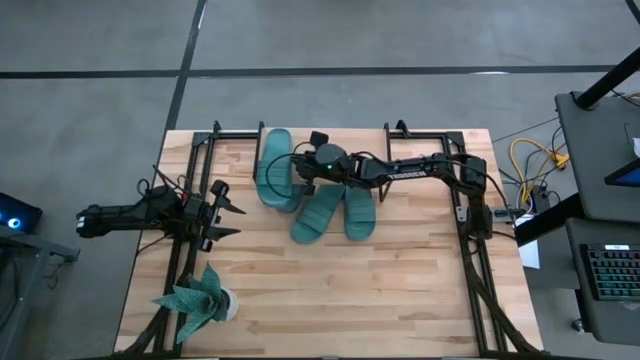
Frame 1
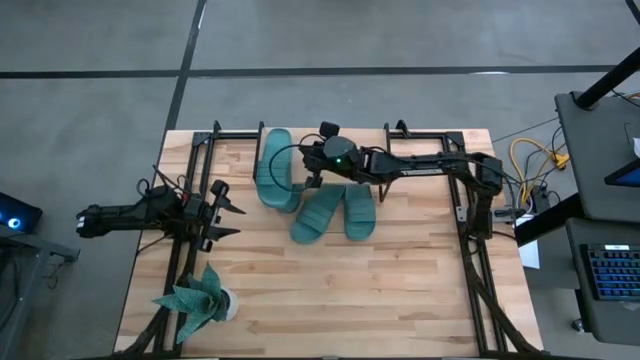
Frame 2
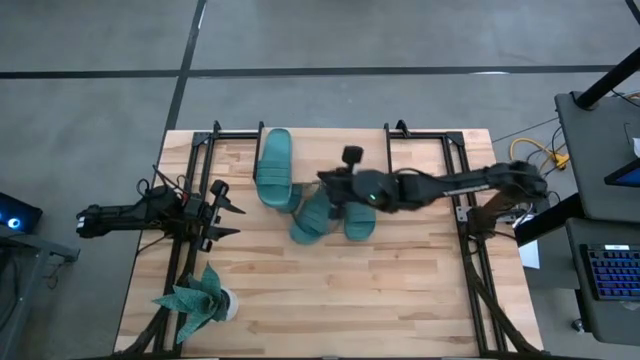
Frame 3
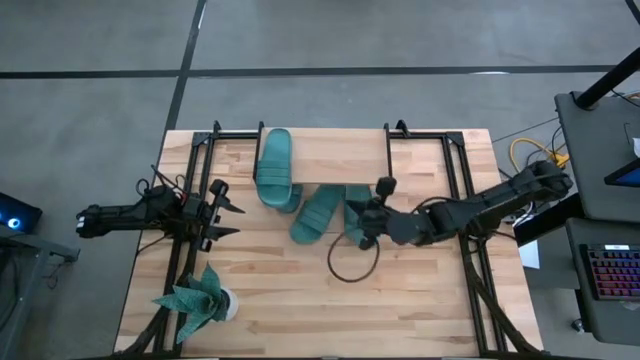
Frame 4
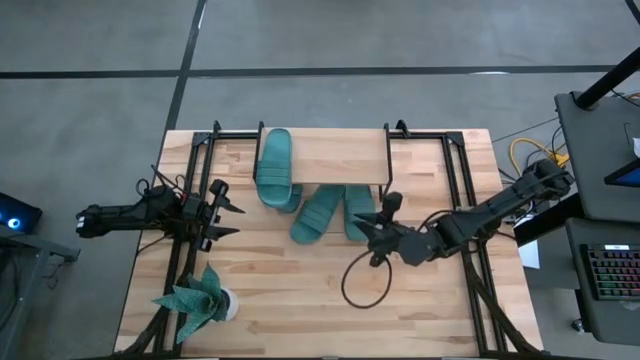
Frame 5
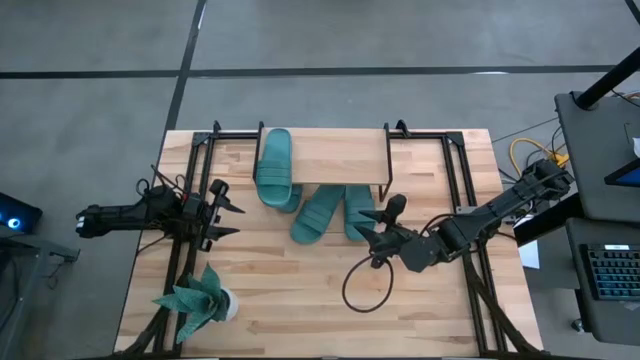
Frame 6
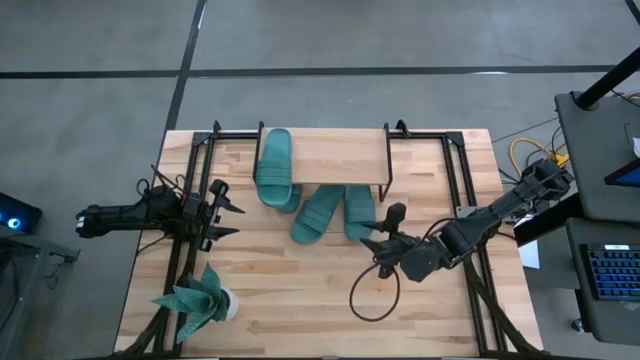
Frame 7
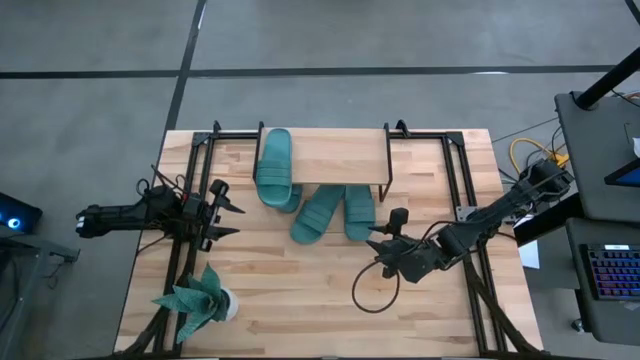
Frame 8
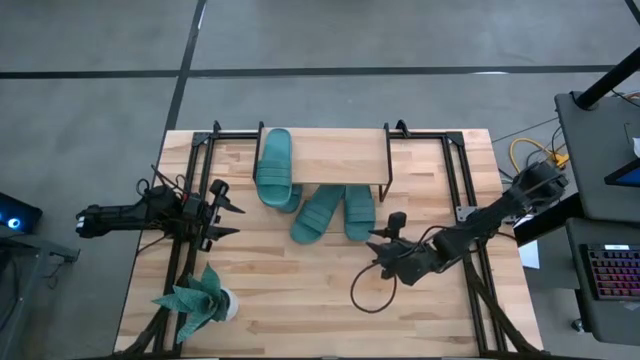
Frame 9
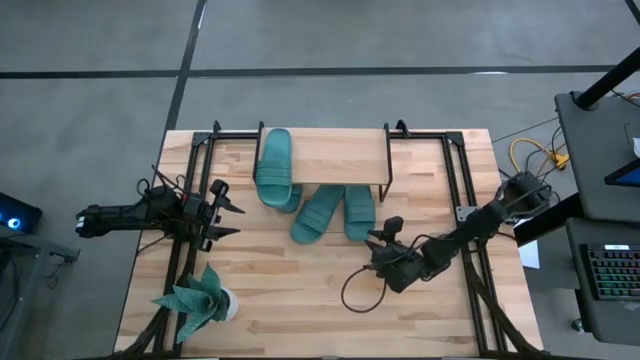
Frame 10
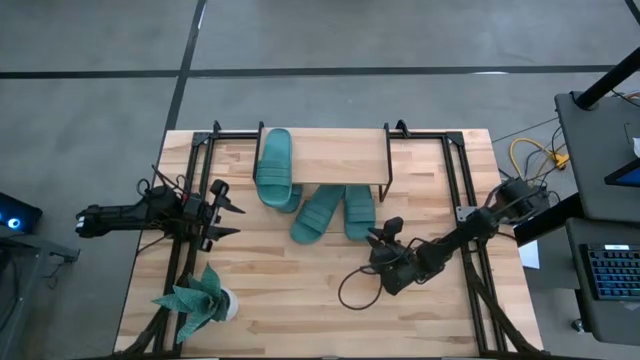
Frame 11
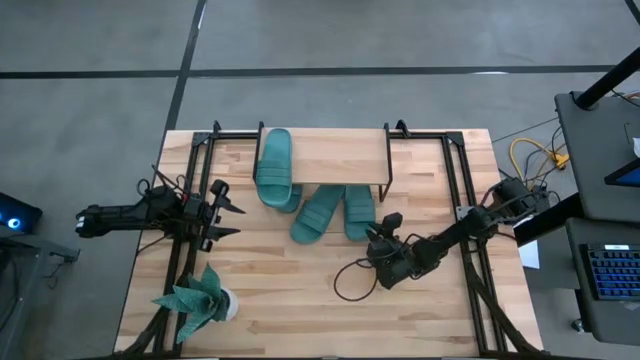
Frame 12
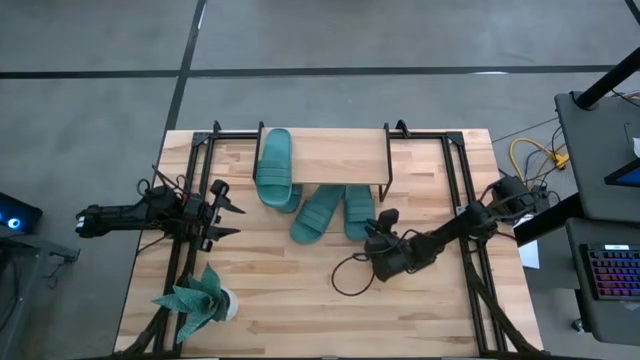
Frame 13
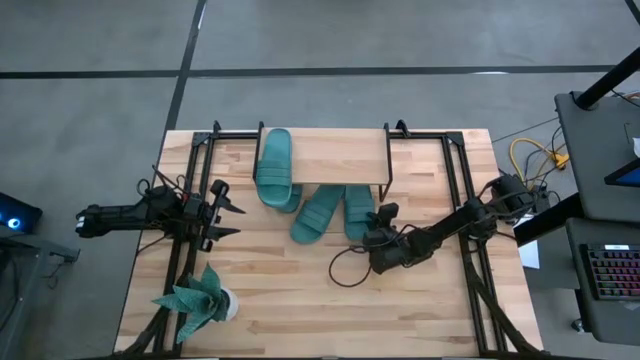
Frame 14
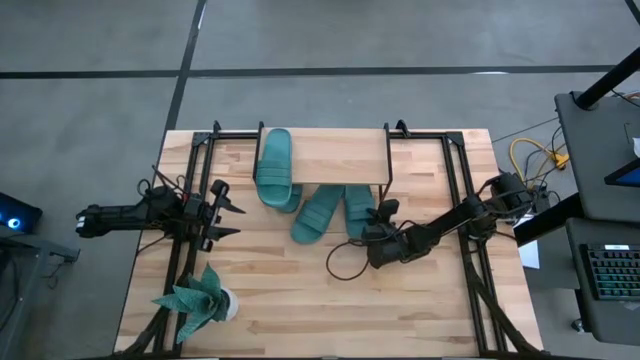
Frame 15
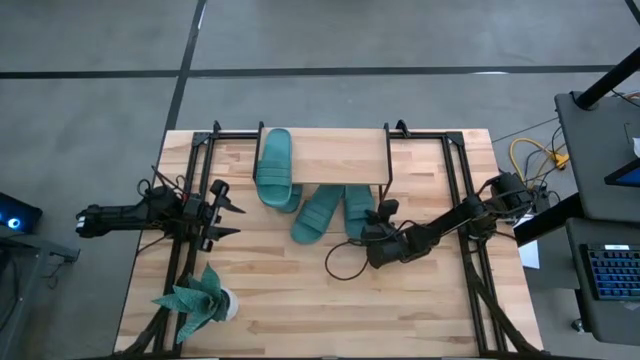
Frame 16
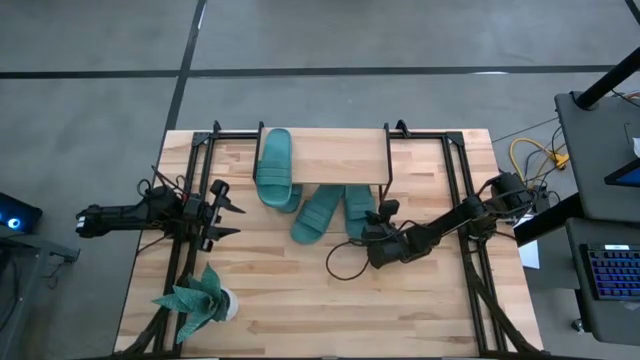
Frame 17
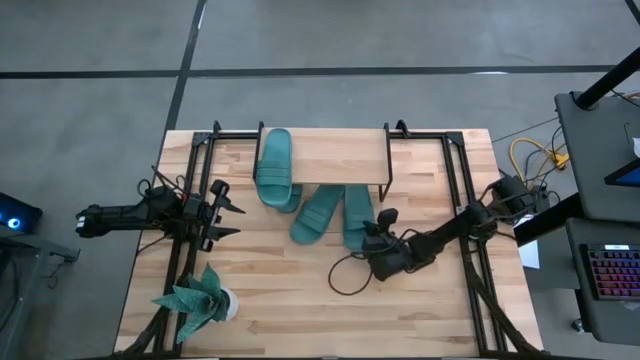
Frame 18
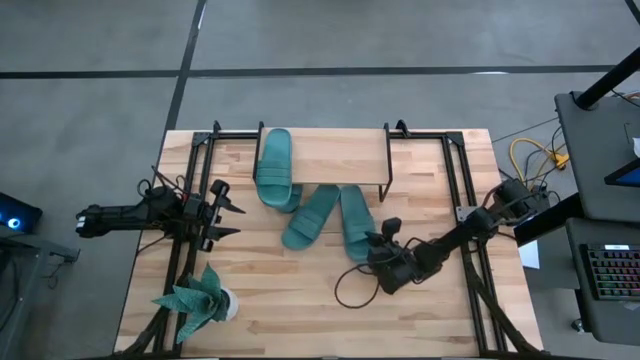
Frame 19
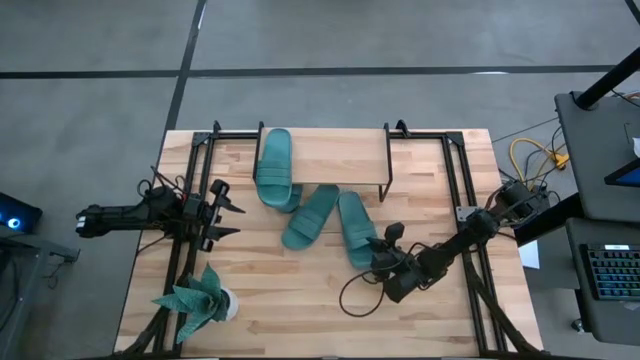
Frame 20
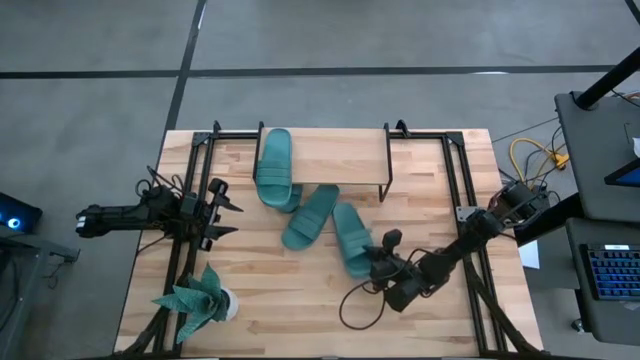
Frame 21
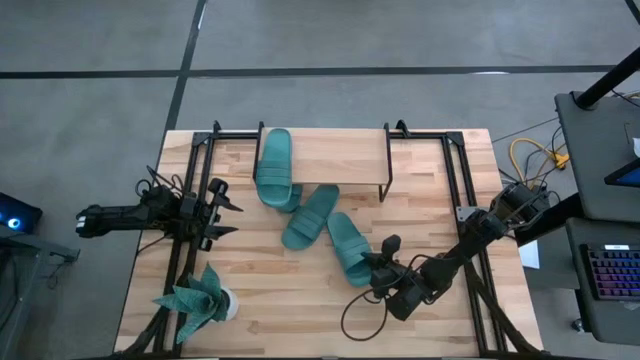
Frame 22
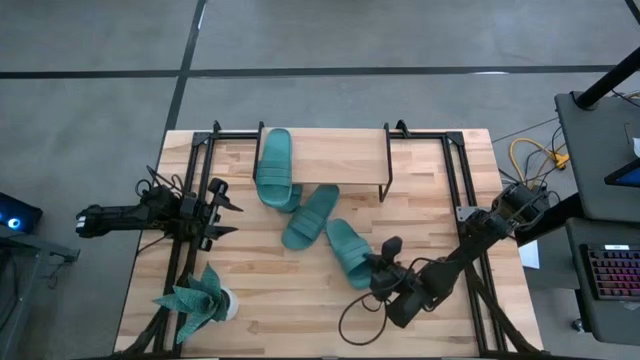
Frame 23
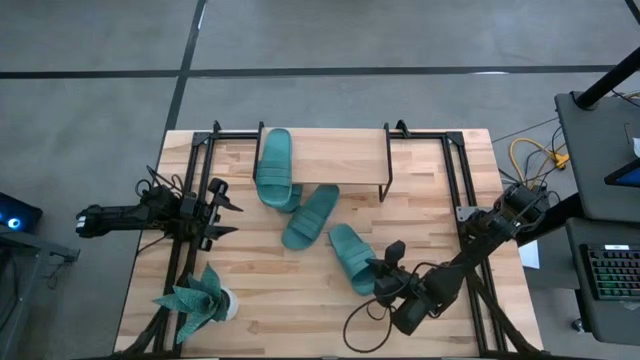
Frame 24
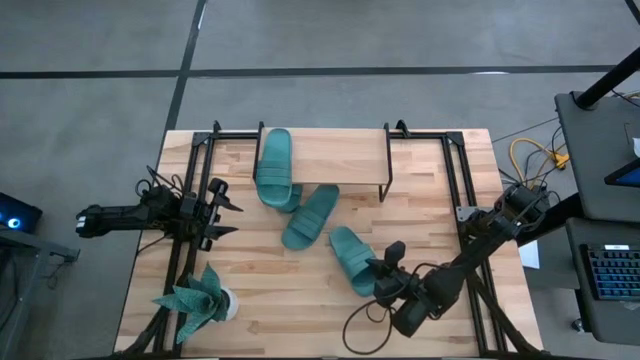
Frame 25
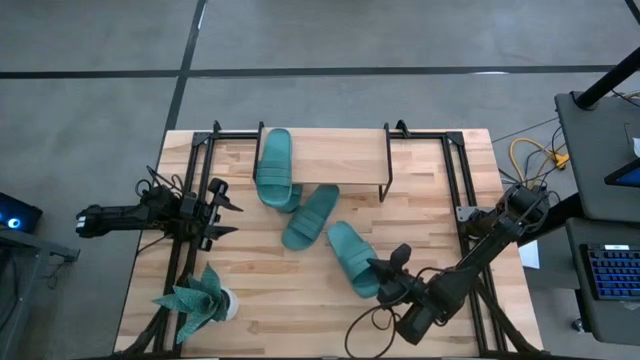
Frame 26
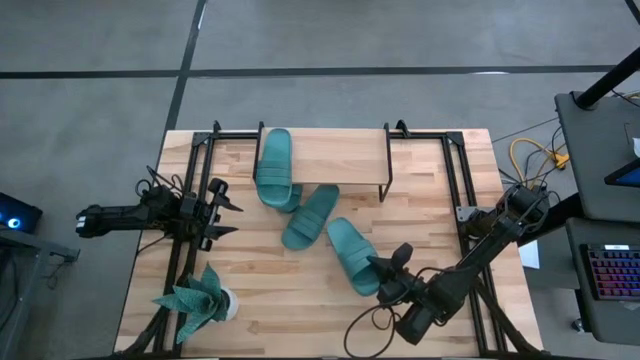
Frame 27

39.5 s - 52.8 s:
Task: Pick and place slides into the shelf
Put the blue slipper on the shelf

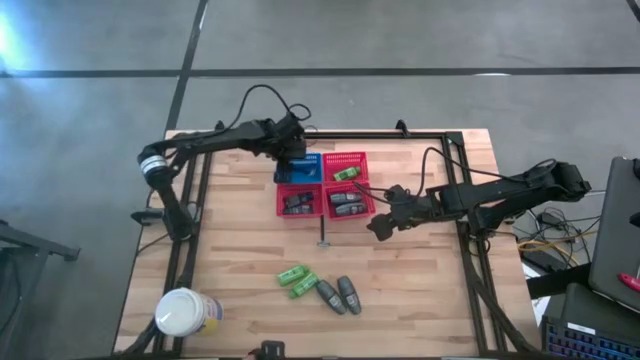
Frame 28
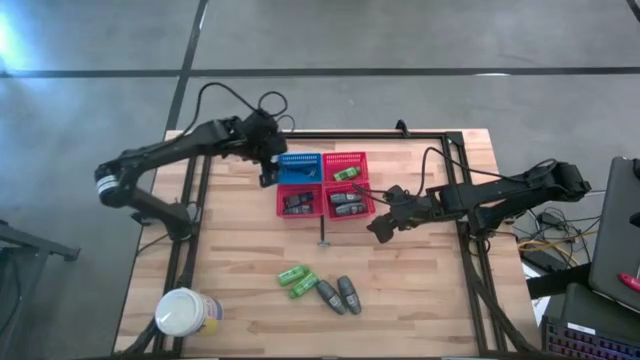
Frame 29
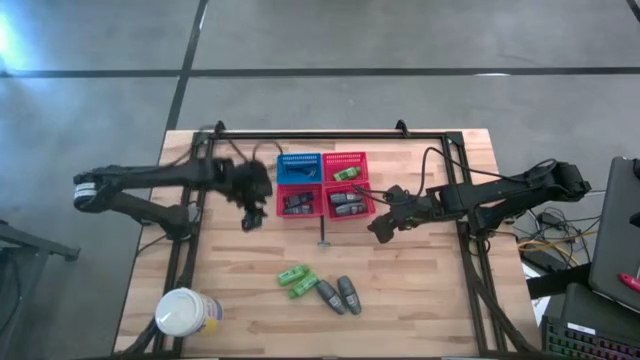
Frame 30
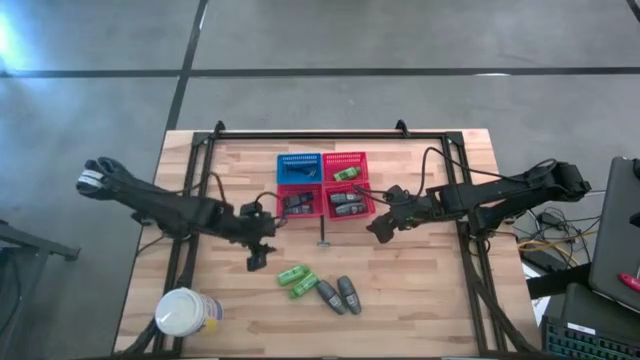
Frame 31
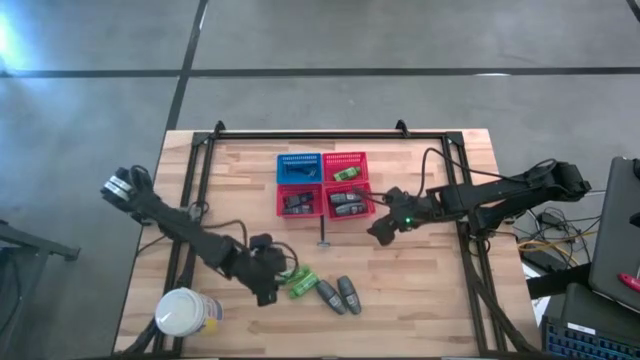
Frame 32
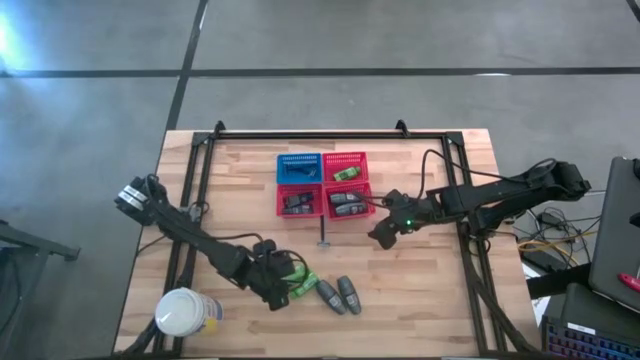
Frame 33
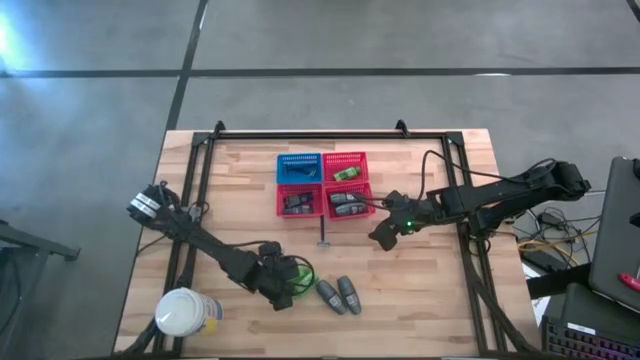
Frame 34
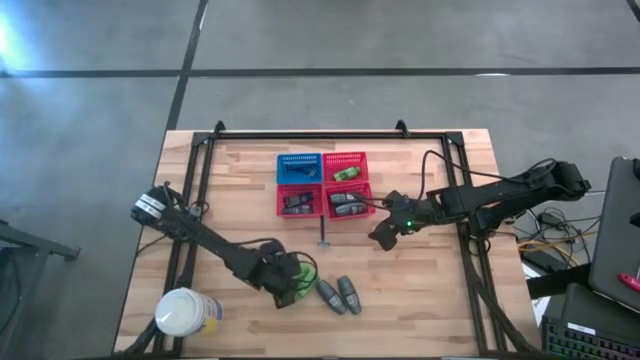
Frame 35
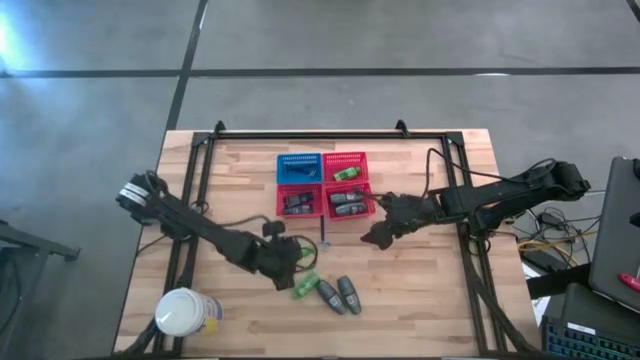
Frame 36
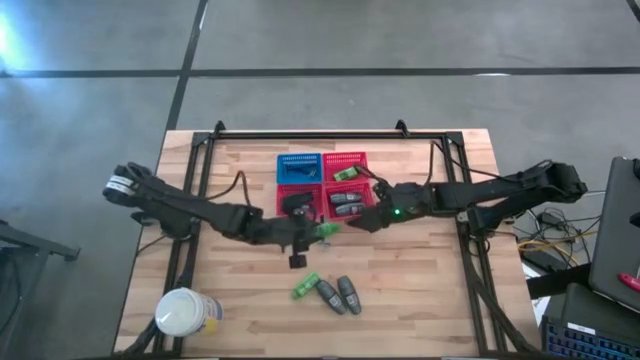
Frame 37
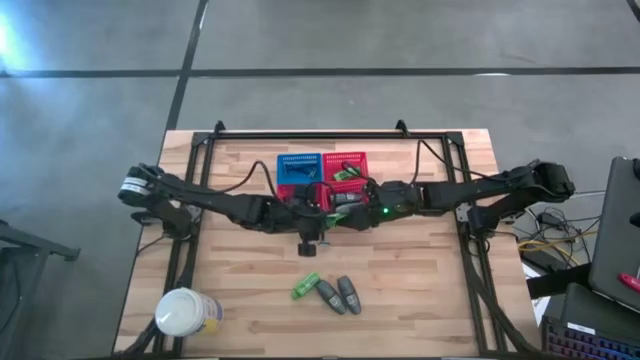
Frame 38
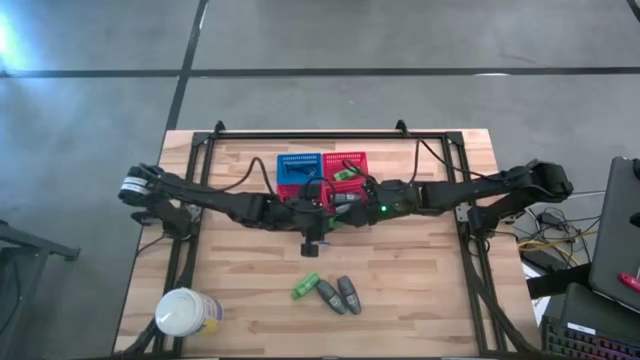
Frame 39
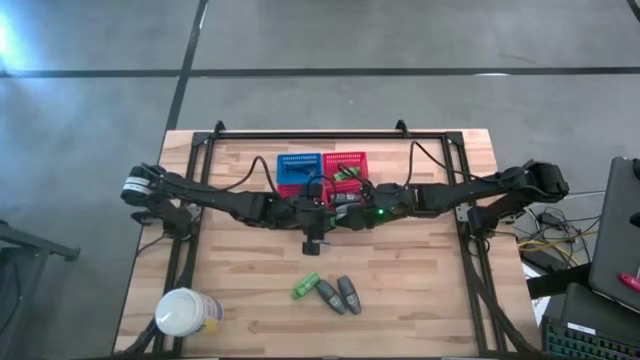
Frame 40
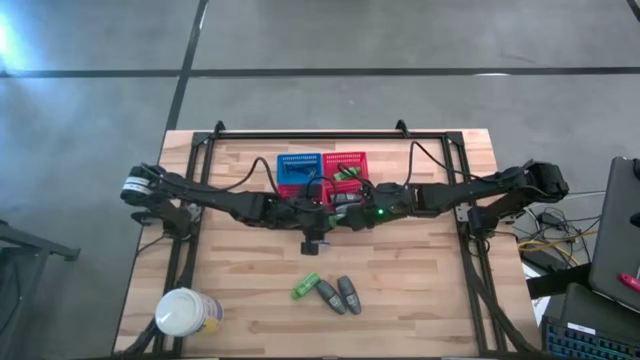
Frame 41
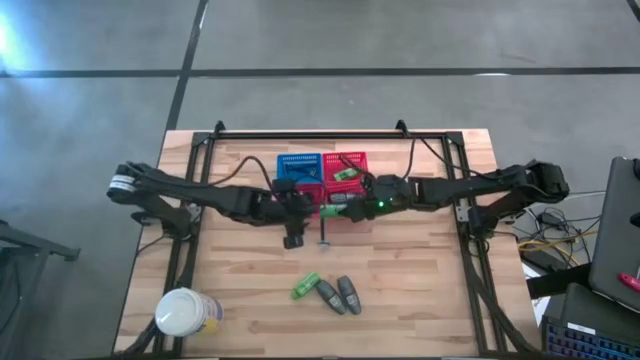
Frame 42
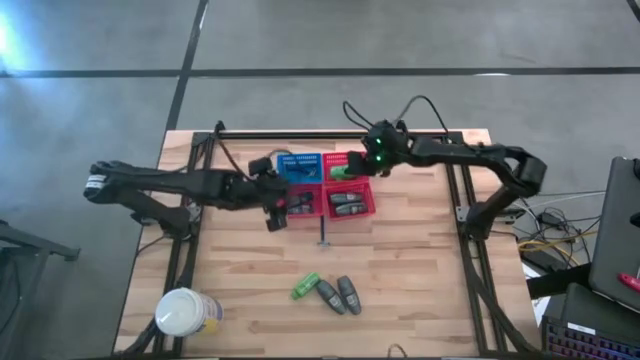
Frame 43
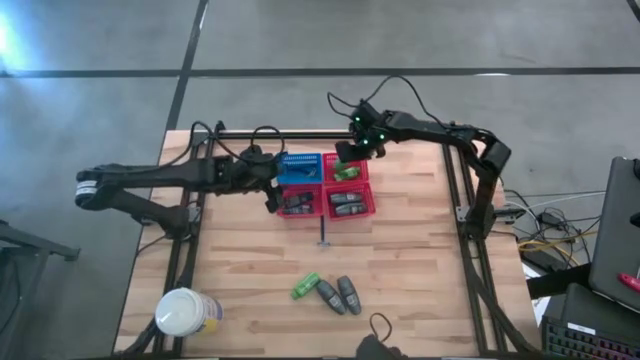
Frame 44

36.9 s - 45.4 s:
Task: Pick & Place Travel size toiletries
Put the shampoo into the top red bin
